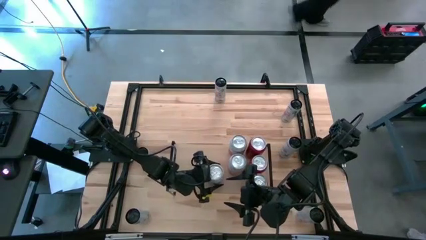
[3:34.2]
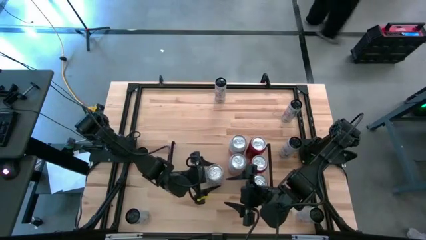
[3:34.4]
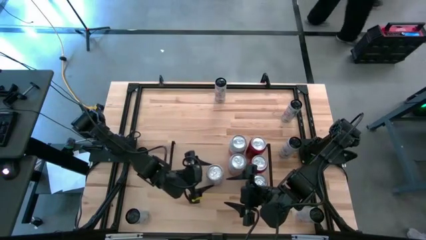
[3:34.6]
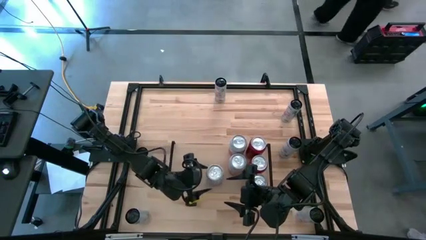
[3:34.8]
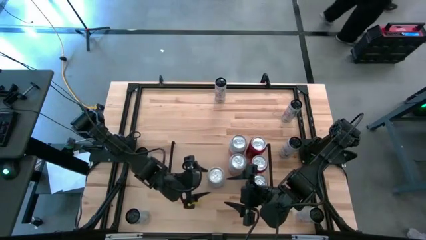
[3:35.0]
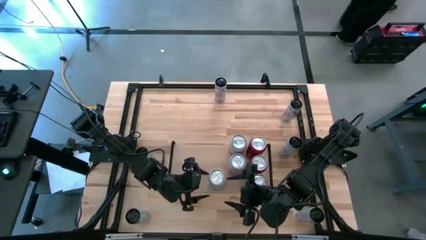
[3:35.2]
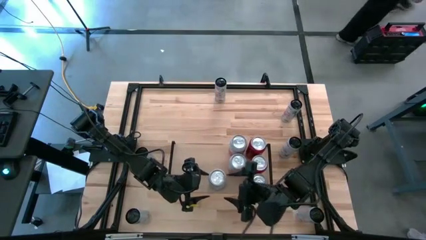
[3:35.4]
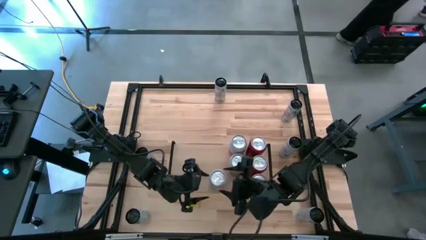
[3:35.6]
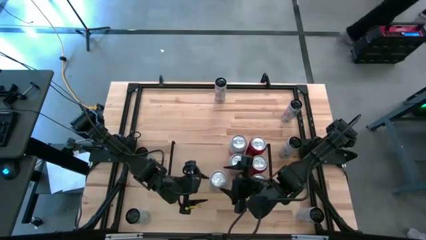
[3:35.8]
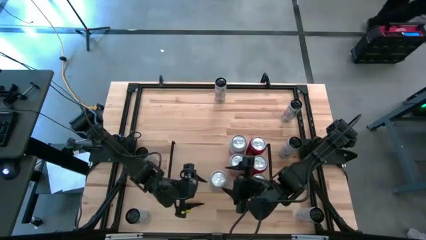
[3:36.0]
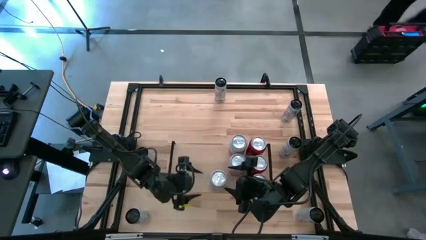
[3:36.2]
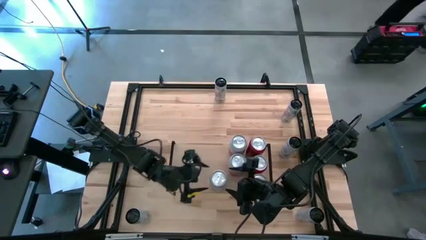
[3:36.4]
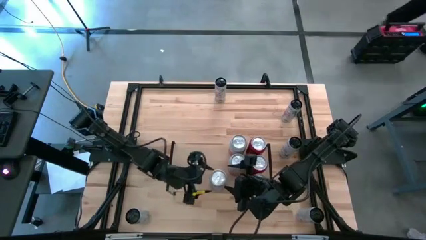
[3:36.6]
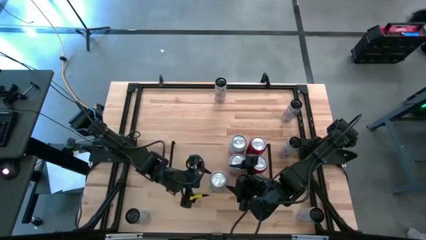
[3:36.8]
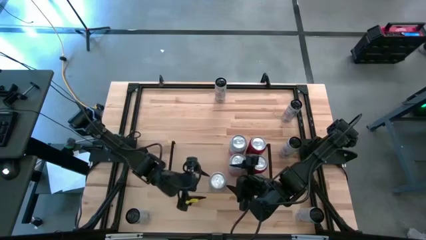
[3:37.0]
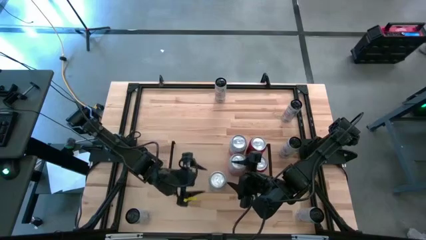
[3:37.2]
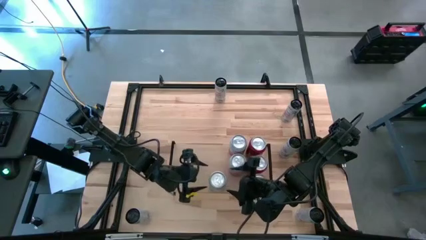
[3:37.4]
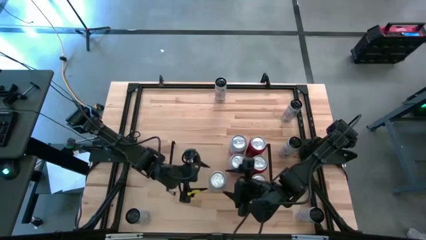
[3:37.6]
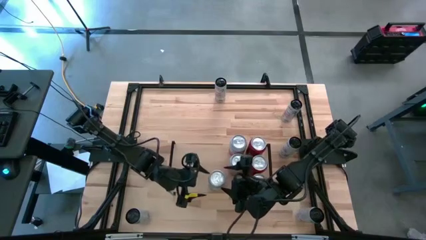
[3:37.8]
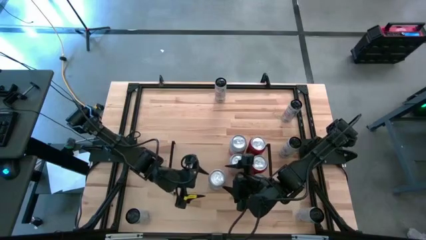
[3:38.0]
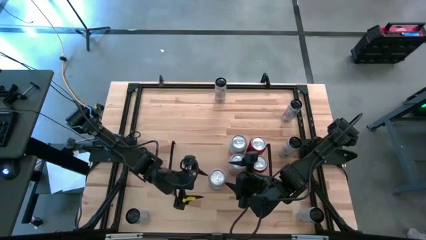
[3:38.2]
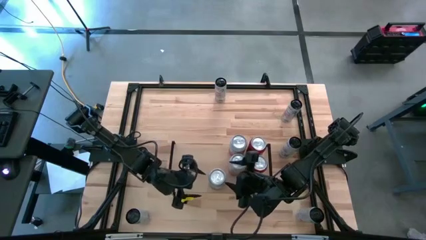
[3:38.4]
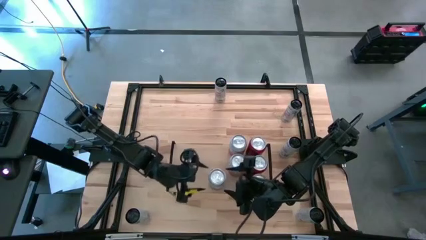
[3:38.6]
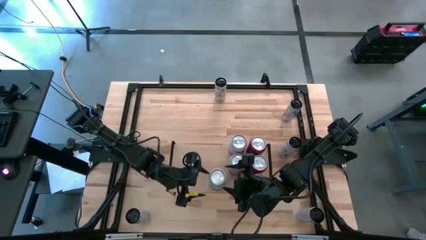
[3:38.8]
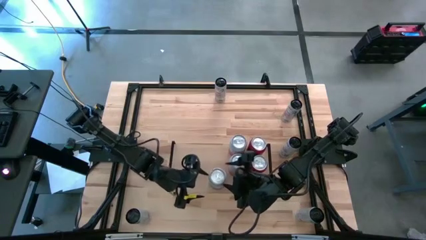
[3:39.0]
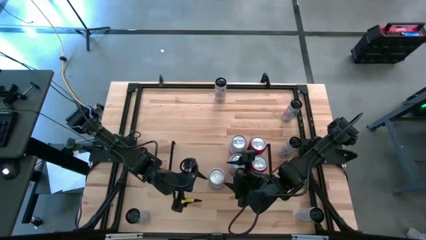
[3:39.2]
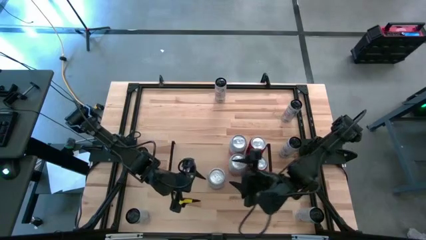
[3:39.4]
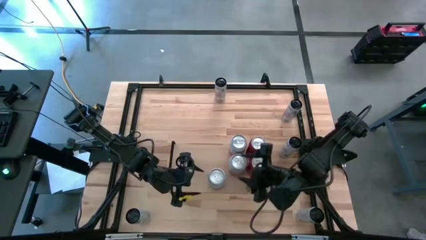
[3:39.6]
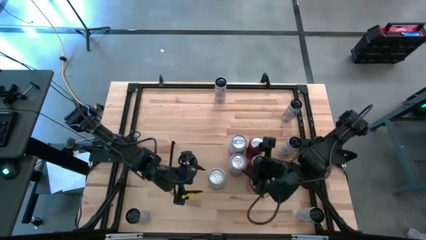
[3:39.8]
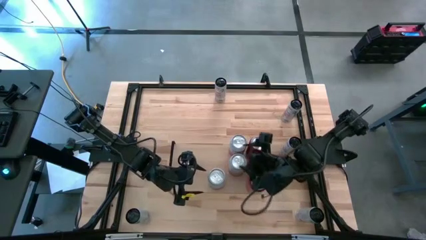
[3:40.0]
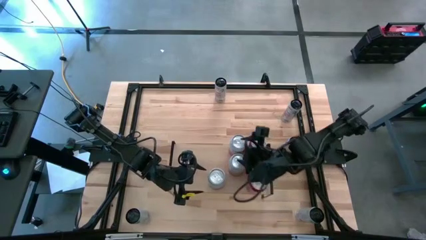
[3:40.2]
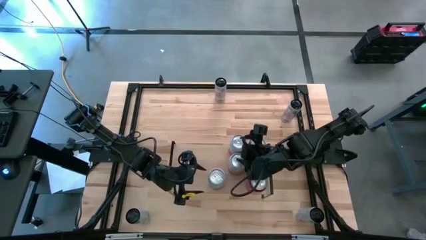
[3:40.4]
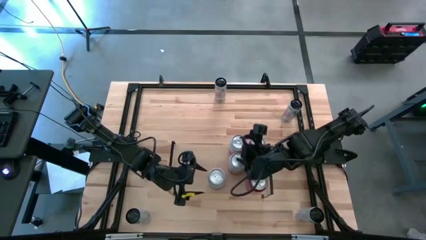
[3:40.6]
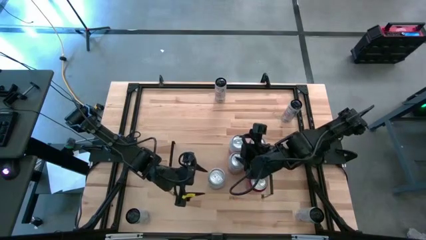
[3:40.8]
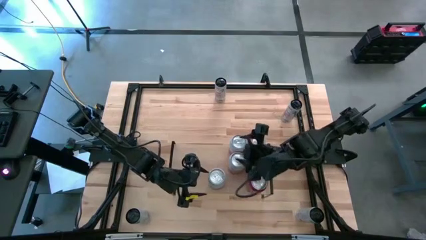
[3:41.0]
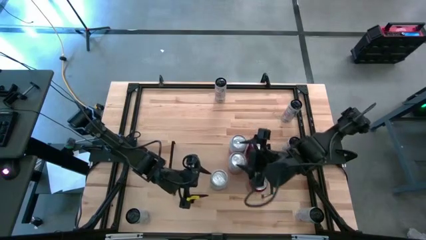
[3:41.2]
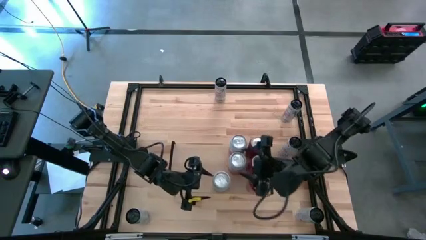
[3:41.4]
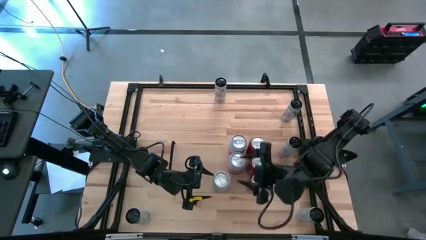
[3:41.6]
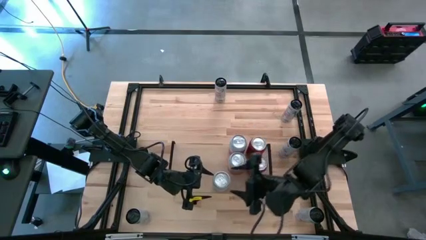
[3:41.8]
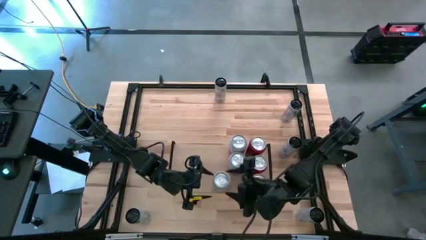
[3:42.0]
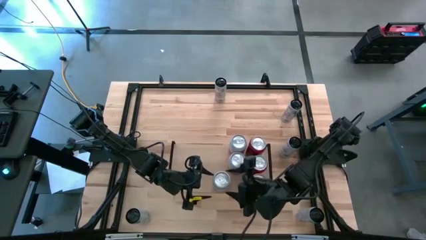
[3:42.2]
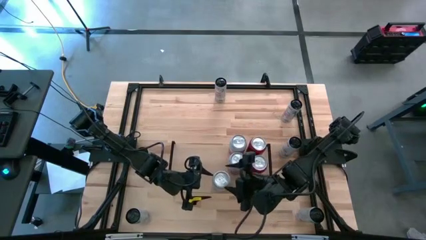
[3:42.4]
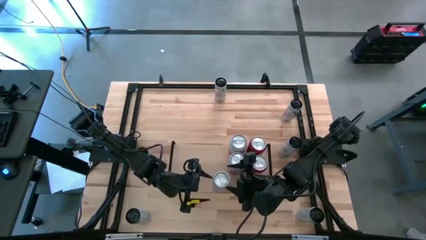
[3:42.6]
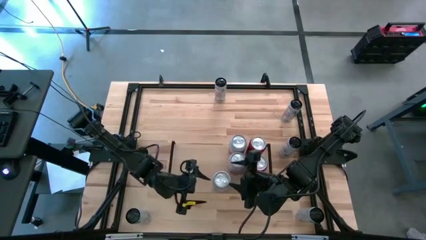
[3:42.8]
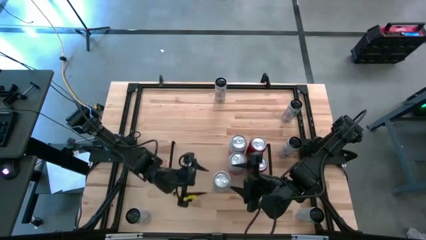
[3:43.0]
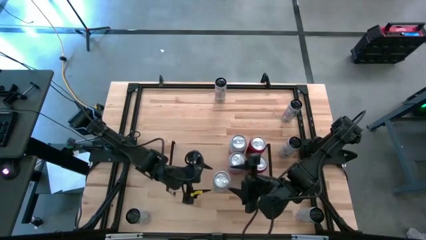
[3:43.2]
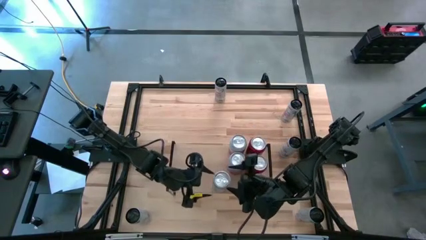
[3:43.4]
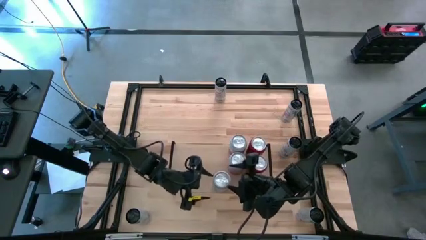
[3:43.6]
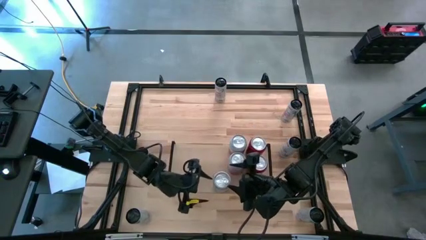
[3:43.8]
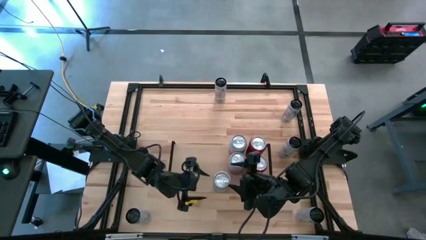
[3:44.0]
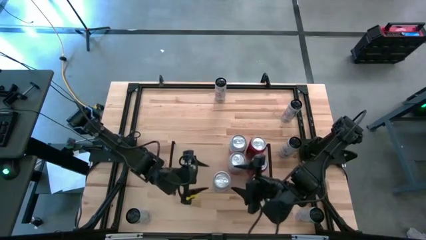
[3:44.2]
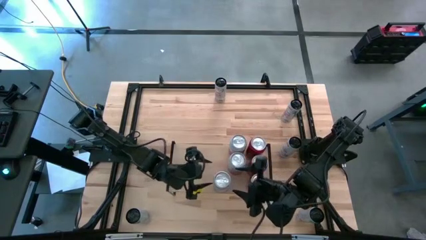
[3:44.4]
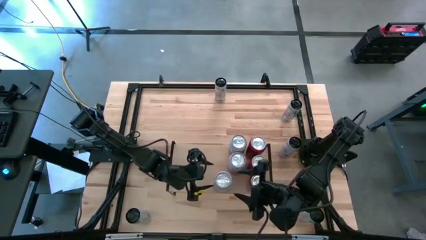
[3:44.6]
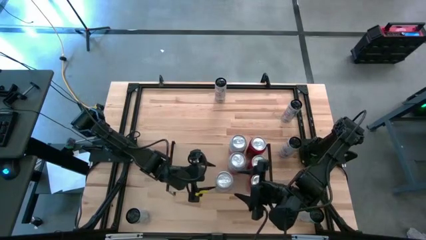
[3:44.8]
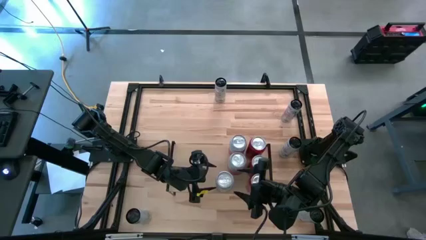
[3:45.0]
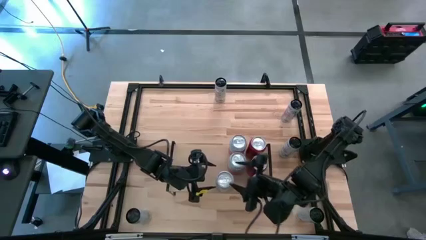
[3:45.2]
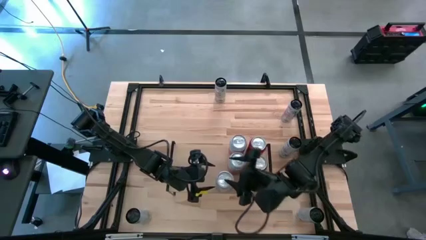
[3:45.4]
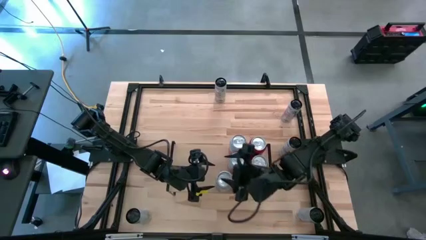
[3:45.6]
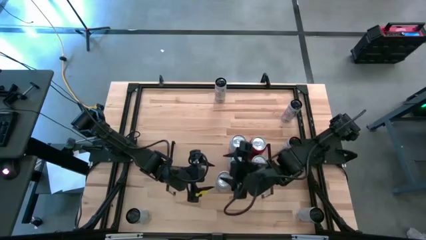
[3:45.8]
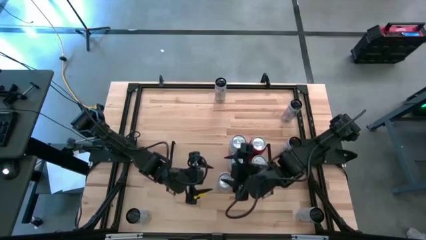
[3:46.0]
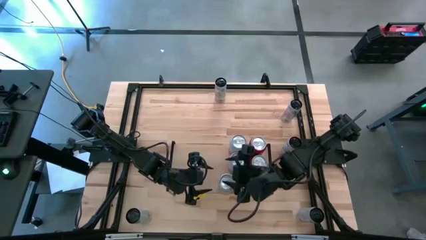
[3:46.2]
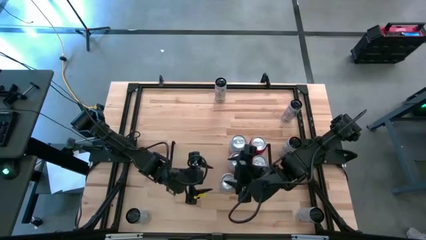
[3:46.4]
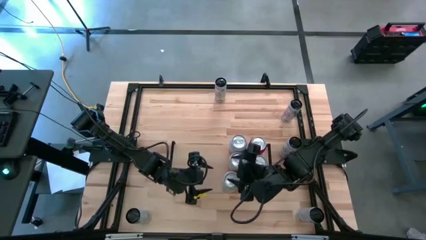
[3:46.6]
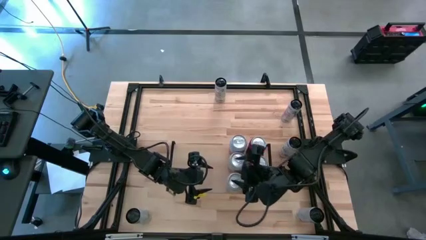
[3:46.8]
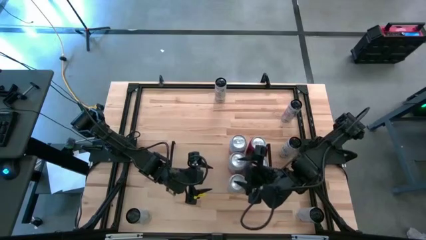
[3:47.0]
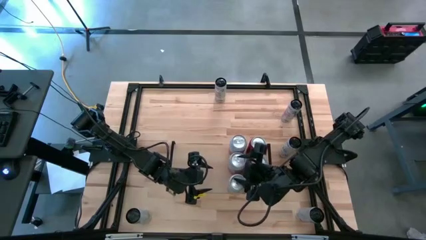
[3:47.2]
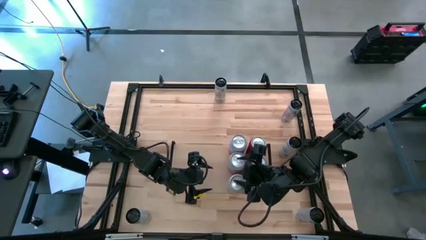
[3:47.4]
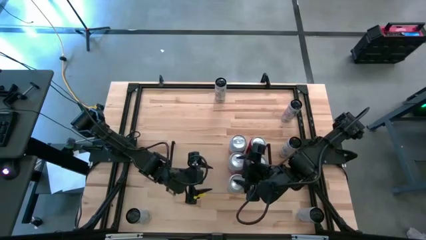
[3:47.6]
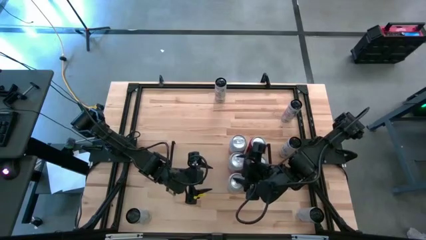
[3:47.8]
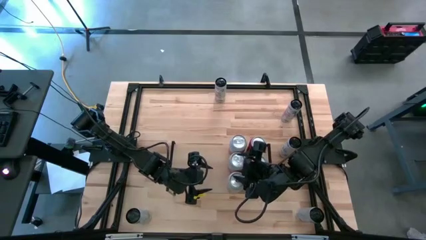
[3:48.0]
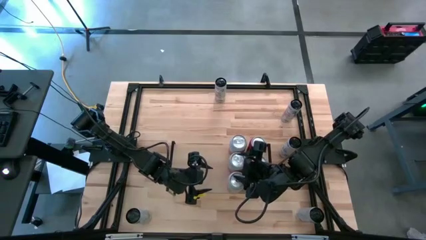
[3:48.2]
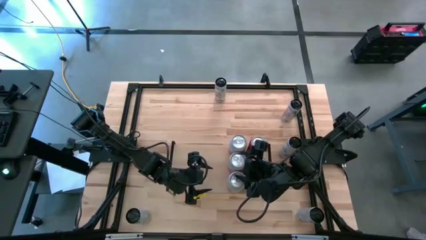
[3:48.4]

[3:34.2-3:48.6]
Task: Place canned beverage on shelf
Put the pink-white soda can on the shelf aligned with the other pink-white soda cans
